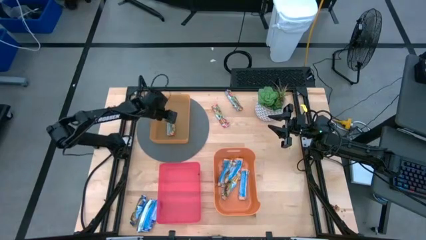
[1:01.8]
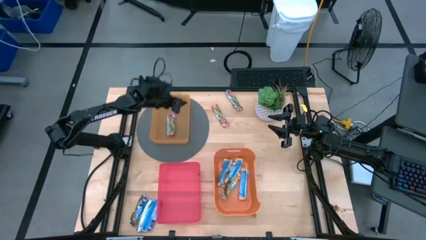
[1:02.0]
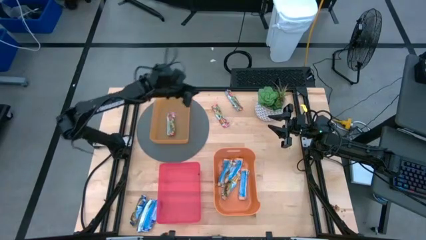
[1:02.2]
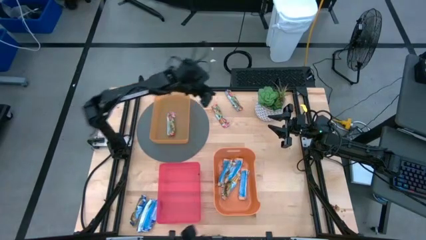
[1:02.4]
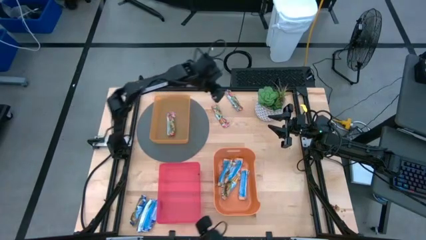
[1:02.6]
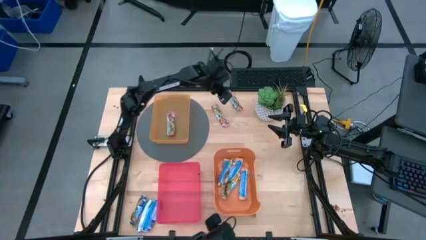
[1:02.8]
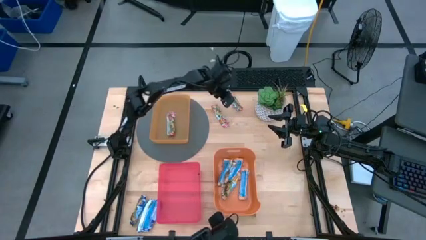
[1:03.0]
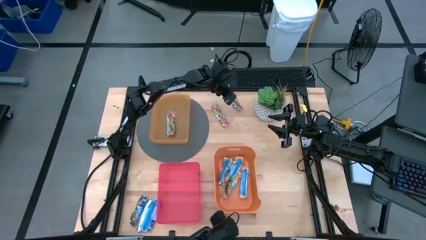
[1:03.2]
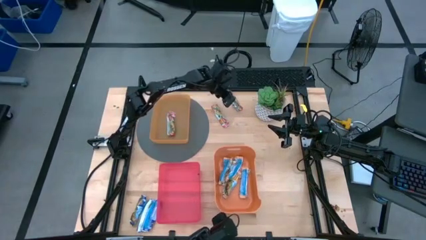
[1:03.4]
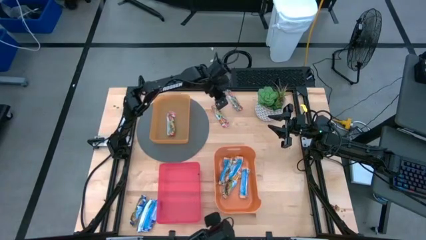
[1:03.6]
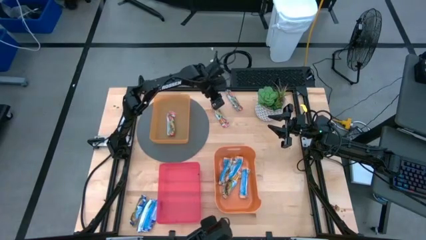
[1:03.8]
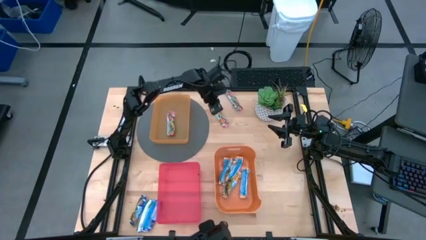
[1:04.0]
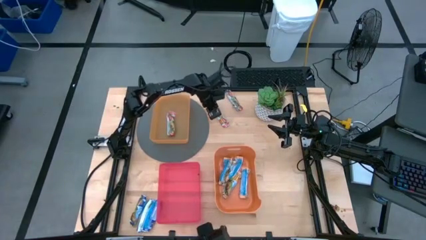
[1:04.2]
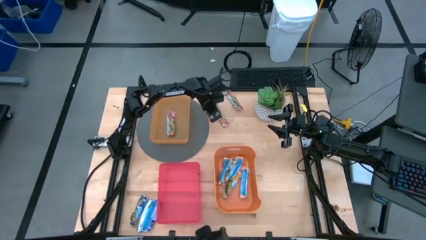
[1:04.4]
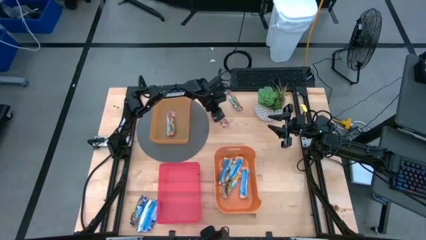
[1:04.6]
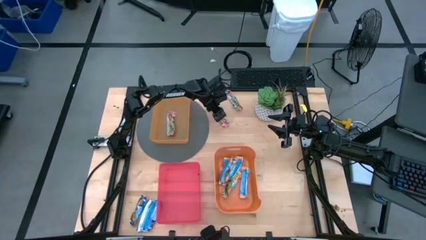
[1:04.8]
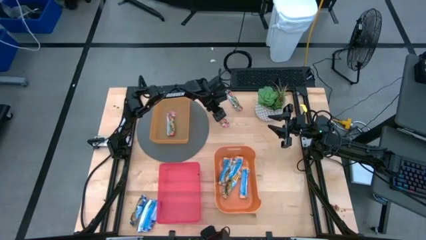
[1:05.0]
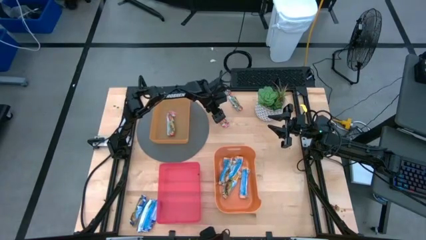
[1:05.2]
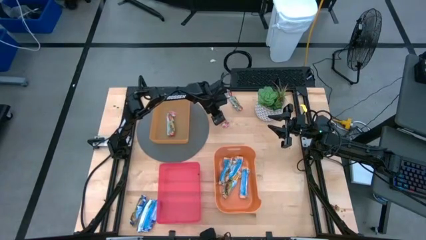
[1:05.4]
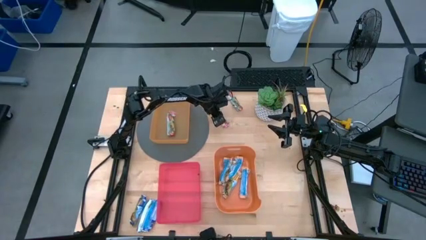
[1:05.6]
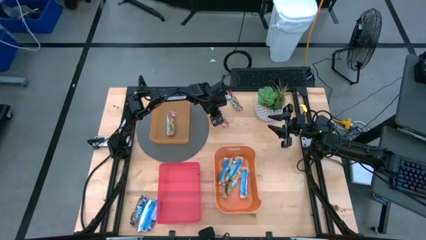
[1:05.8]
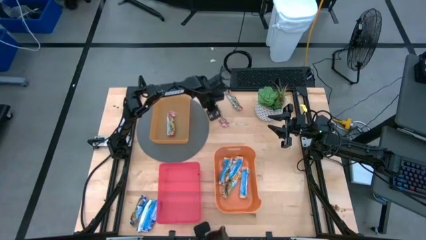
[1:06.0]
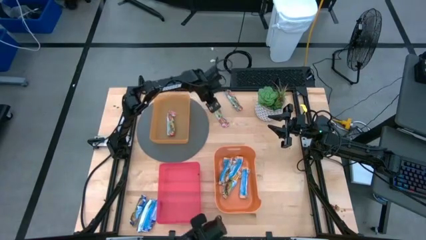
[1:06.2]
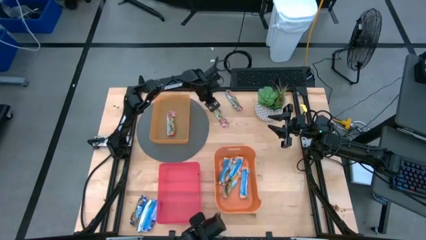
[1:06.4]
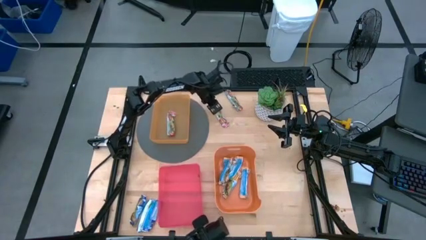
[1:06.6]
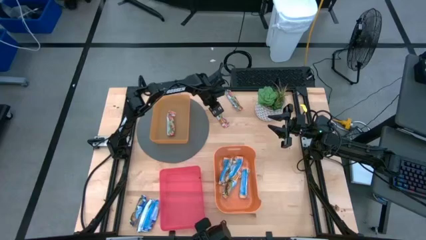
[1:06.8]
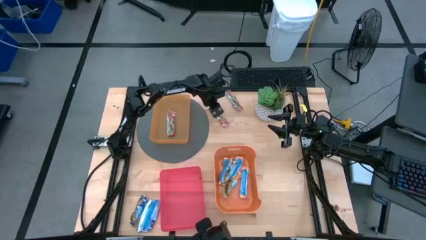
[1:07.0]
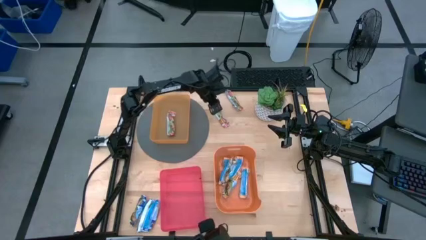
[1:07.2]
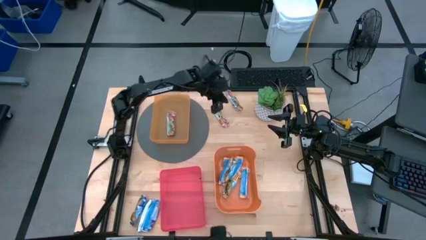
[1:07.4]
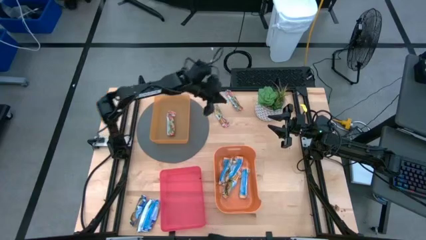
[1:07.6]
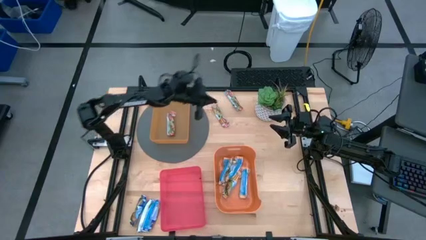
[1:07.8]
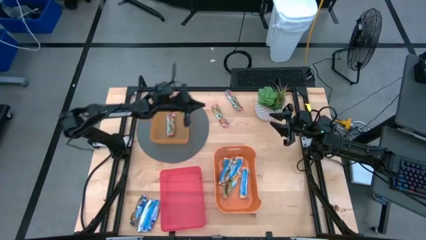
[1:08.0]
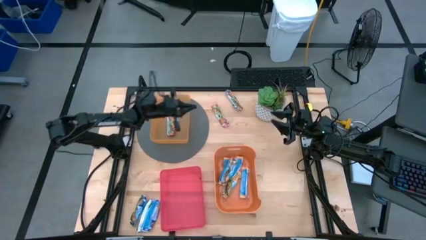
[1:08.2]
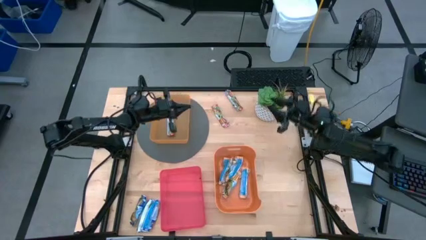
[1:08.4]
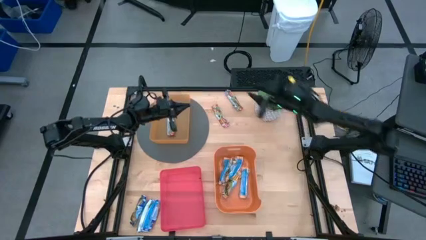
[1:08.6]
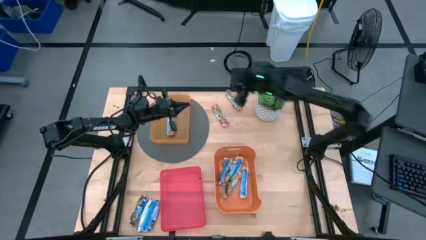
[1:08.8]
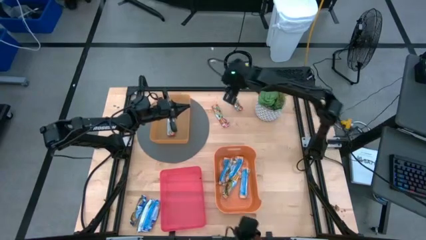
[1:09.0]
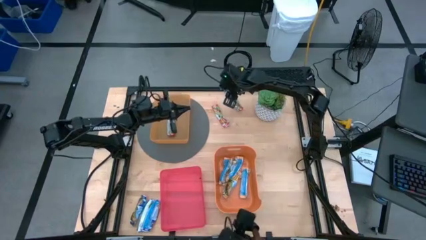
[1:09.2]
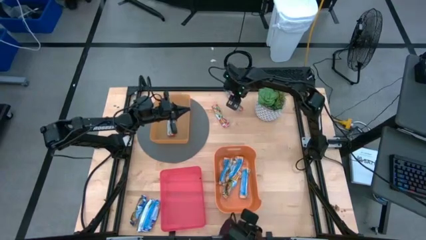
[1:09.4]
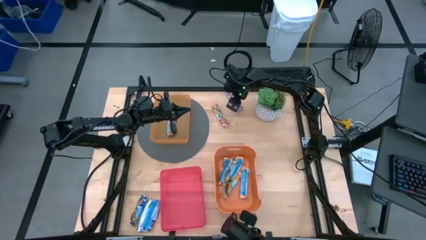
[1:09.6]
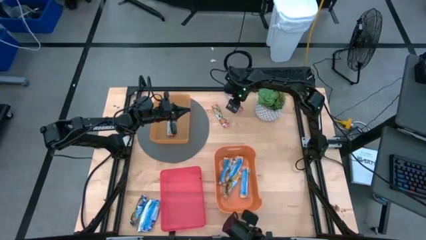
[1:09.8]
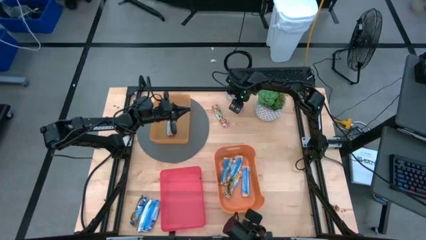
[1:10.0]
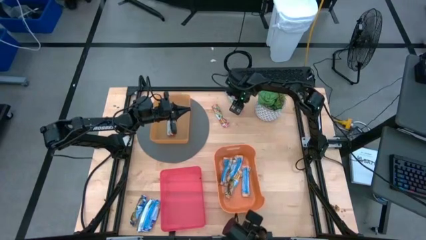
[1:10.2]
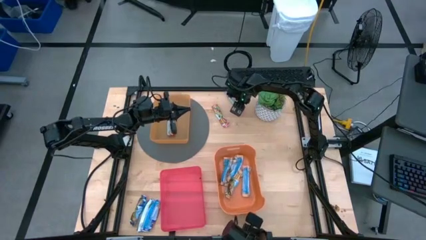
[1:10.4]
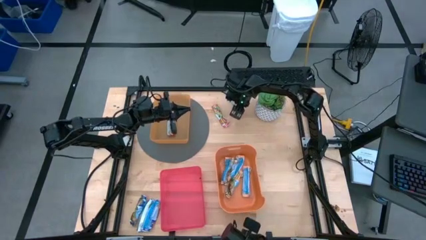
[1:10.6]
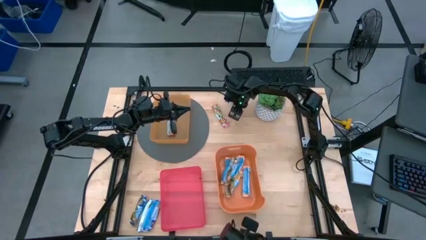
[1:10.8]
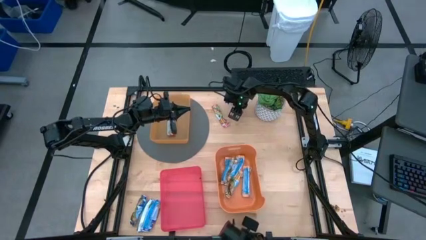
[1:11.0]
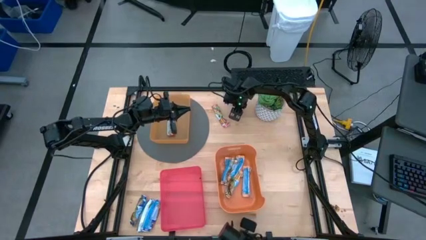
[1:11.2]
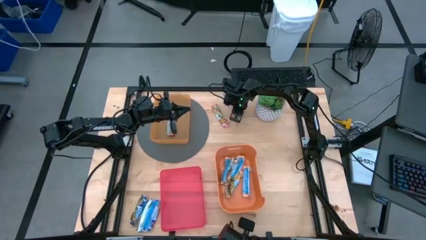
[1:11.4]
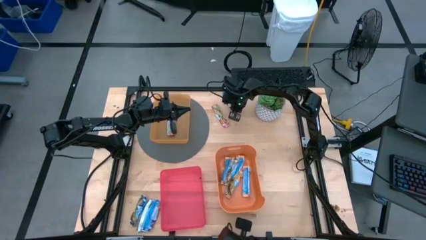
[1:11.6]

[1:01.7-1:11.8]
Task: Pick and place Granola Bars by type
Put the red granola bar into the light orange bin

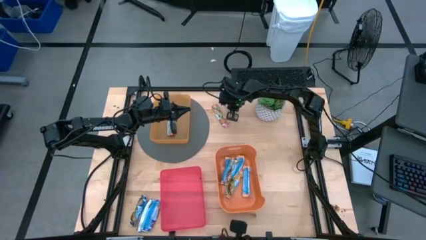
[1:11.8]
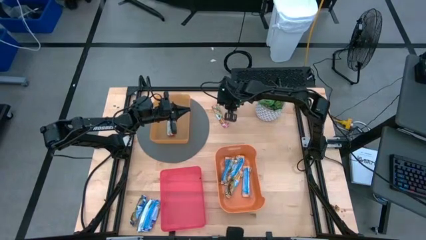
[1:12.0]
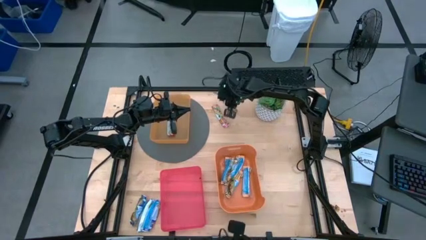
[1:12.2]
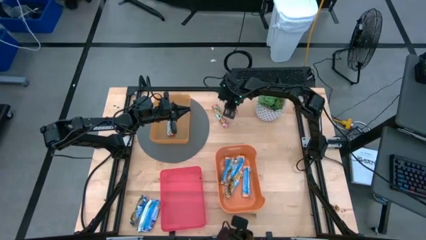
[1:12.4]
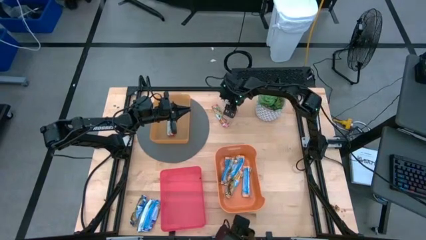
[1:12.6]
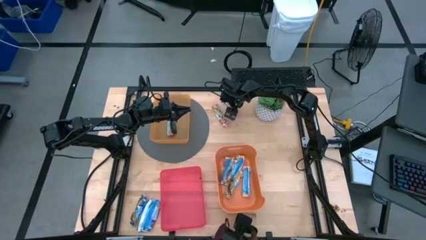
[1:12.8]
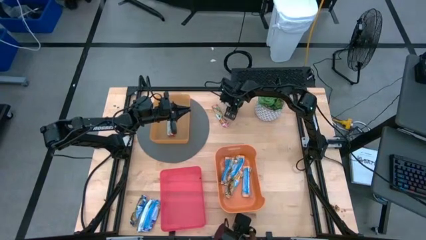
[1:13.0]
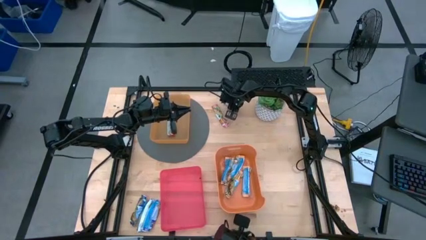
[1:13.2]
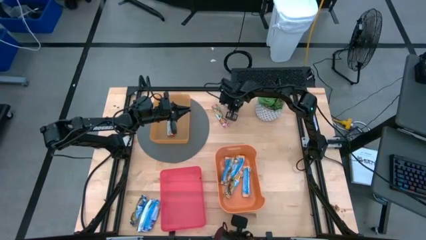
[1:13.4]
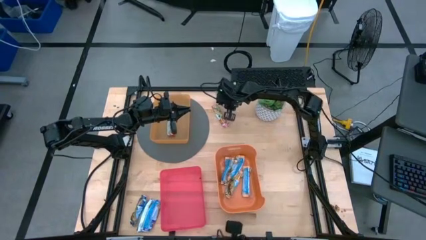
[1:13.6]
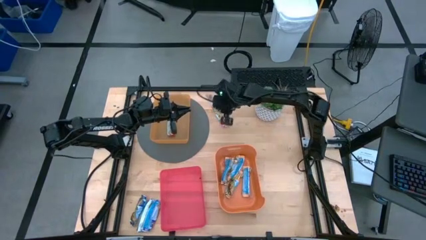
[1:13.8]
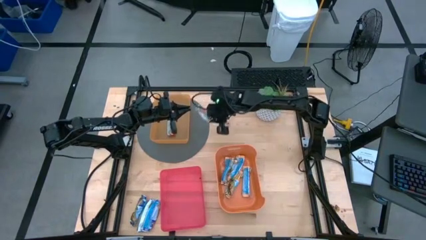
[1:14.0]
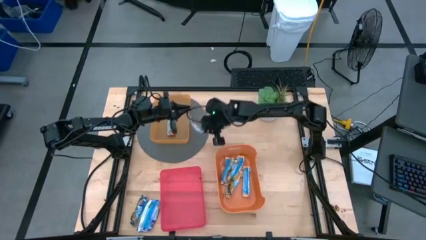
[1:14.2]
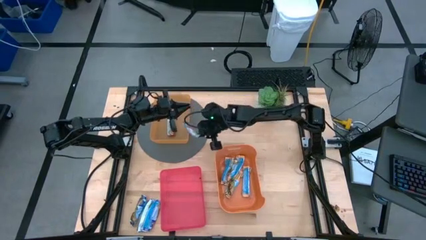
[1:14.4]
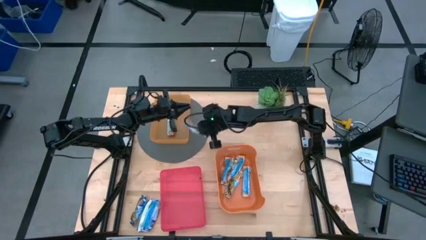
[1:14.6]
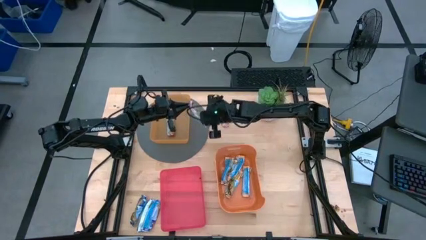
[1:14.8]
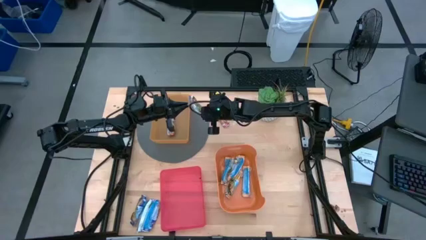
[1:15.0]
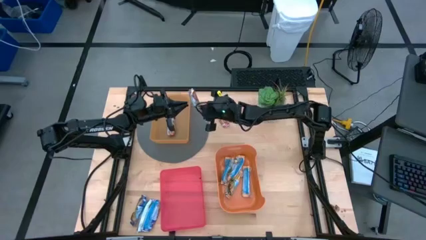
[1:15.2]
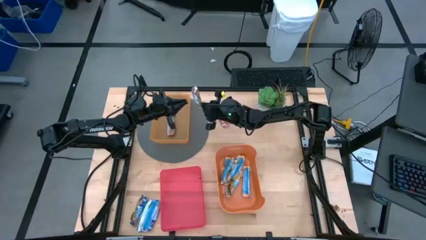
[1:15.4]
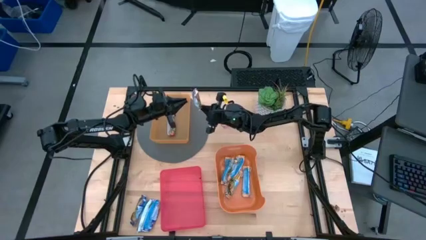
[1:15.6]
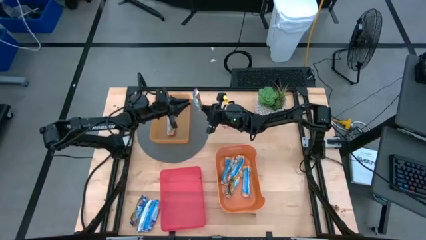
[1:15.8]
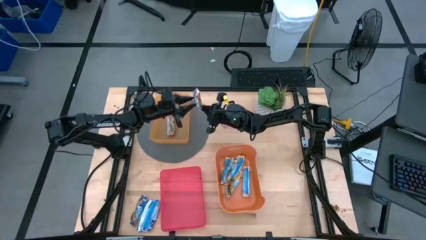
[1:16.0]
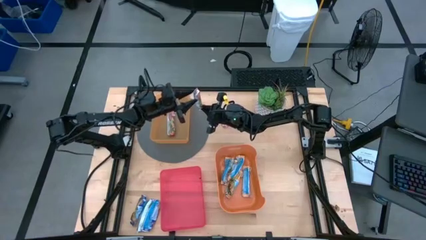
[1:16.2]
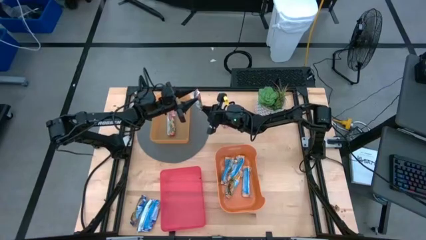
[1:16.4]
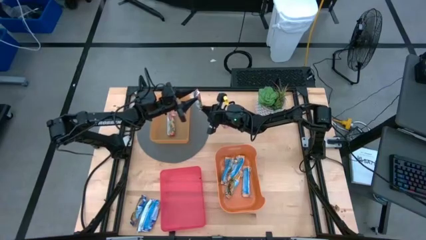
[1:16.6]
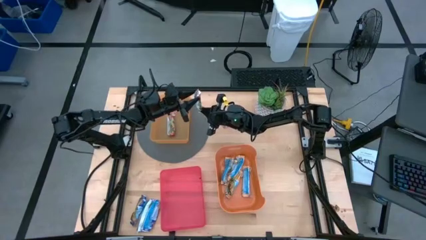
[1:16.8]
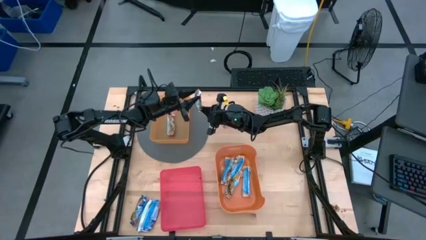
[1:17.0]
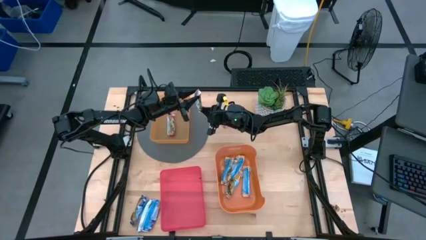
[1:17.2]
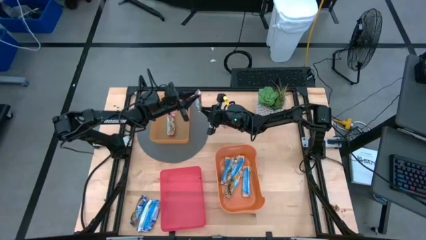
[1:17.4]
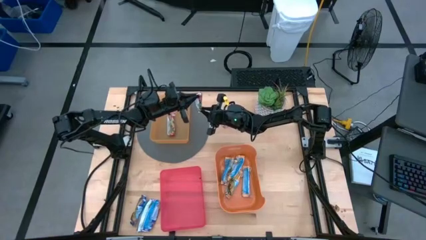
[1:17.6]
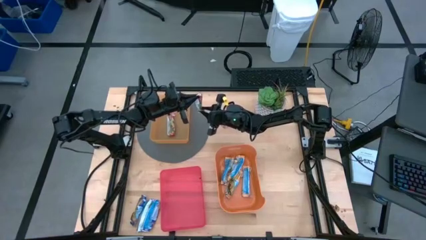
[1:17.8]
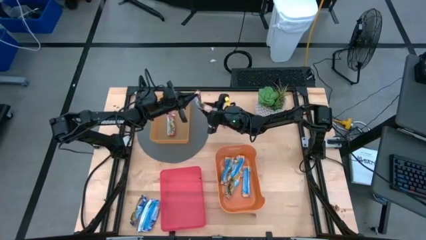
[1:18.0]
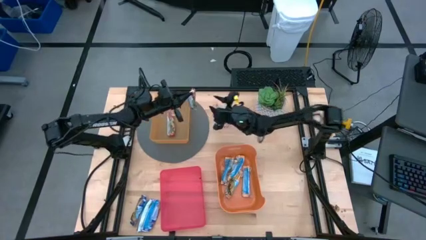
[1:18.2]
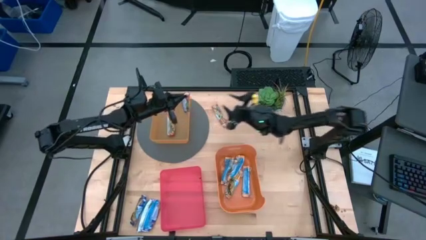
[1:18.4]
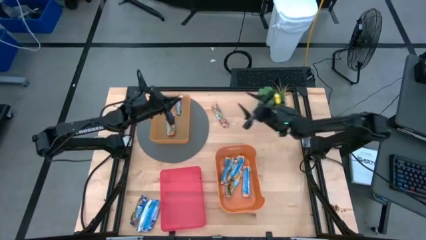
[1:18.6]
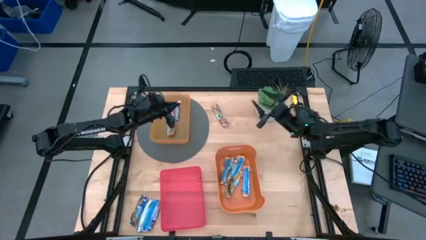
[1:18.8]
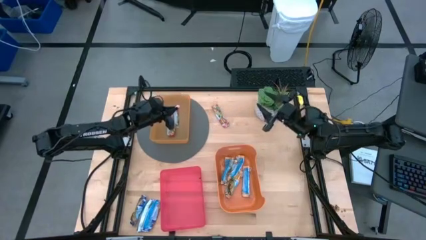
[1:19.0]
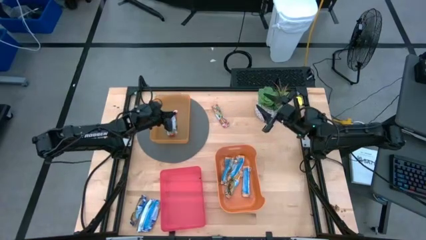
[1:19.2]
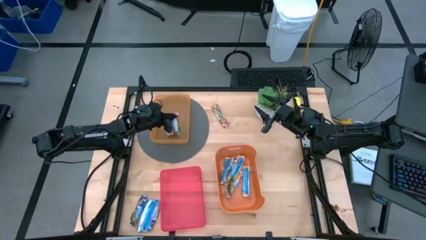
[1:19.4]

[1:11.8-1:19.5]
Put the red granola bar into the light orange bin
